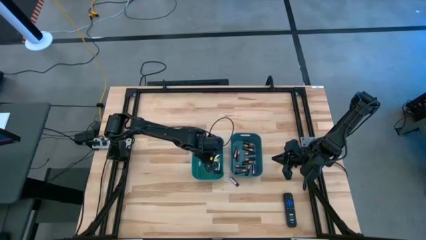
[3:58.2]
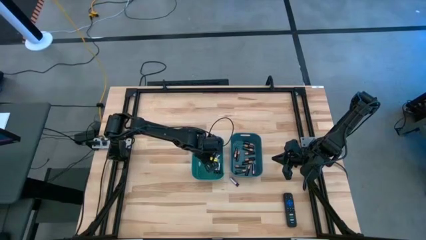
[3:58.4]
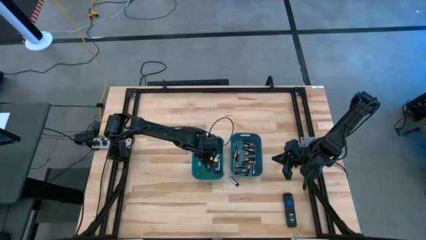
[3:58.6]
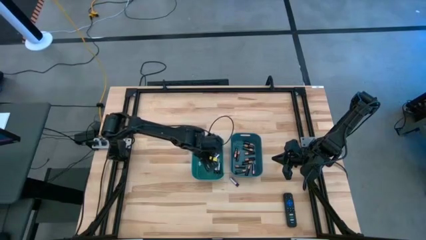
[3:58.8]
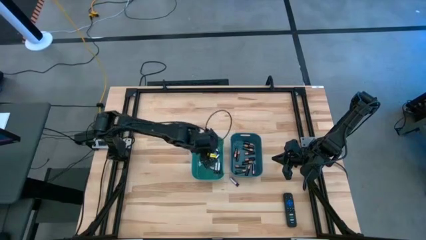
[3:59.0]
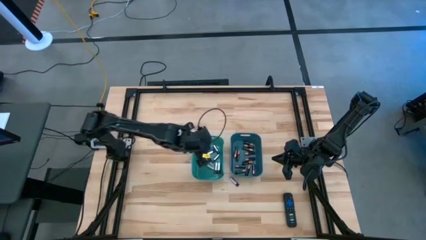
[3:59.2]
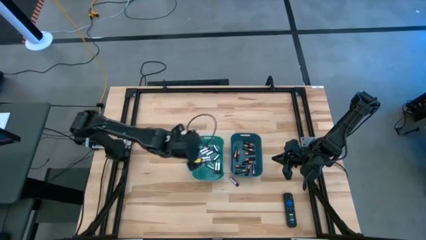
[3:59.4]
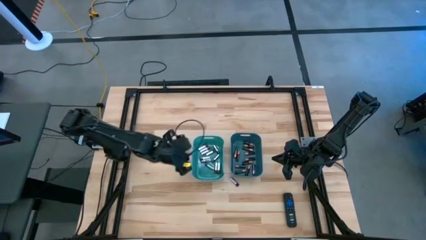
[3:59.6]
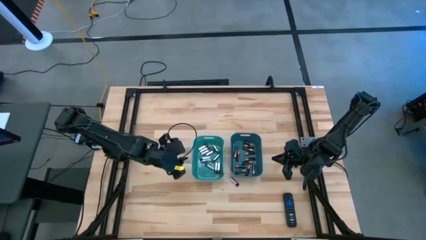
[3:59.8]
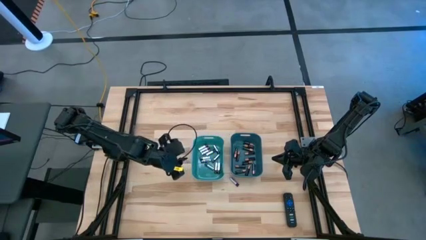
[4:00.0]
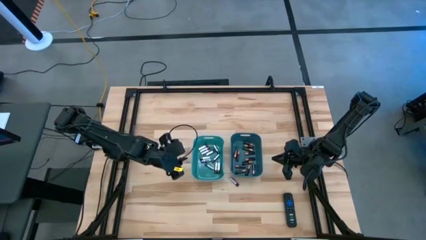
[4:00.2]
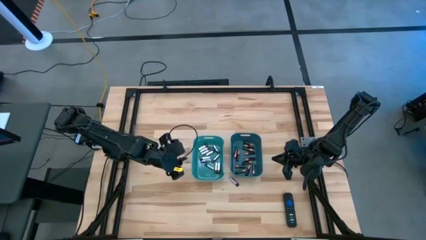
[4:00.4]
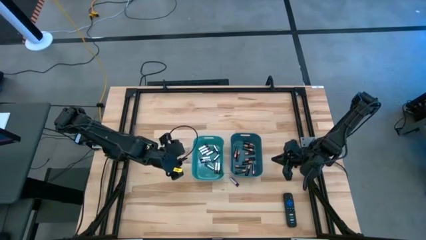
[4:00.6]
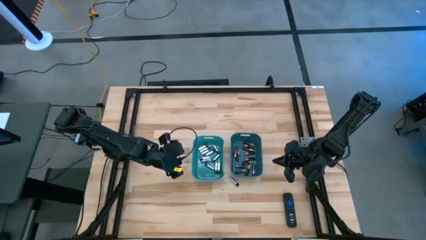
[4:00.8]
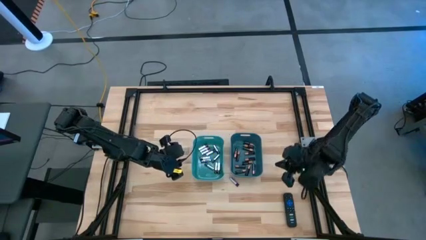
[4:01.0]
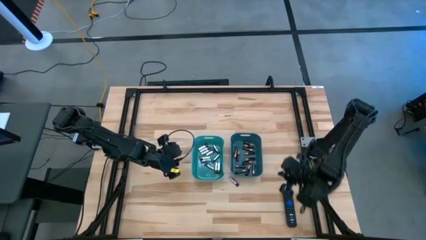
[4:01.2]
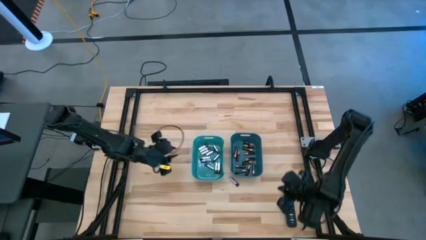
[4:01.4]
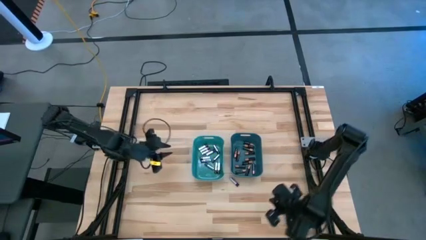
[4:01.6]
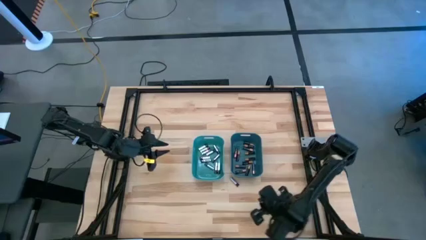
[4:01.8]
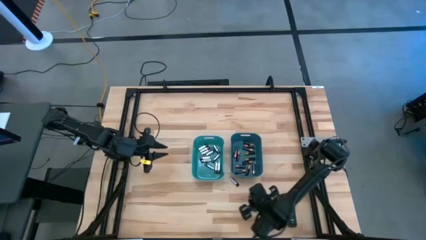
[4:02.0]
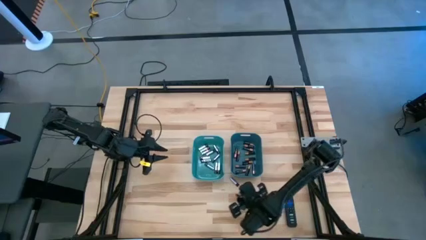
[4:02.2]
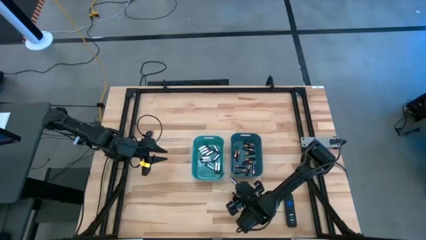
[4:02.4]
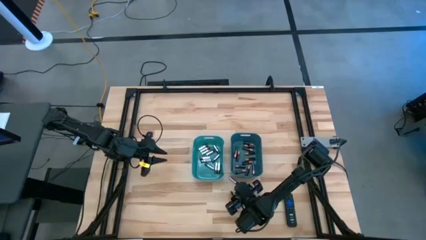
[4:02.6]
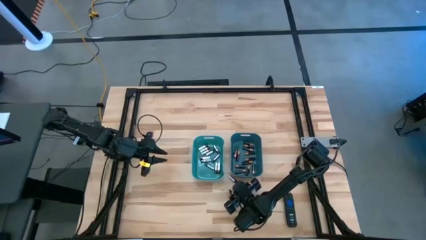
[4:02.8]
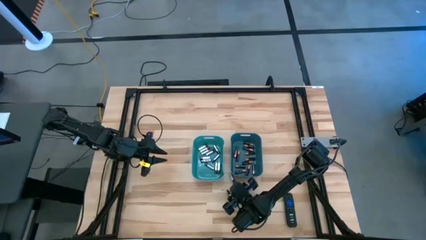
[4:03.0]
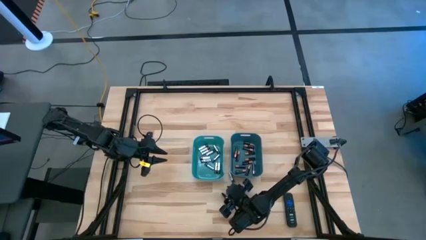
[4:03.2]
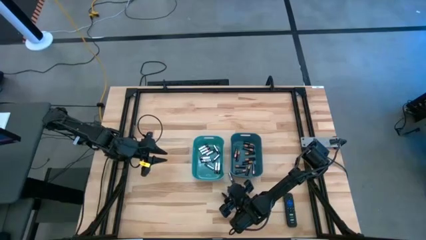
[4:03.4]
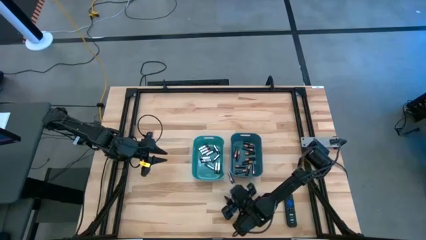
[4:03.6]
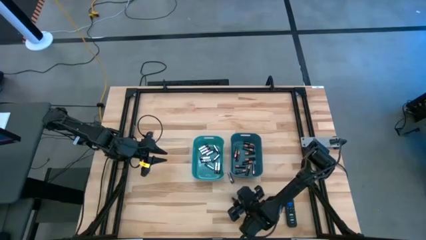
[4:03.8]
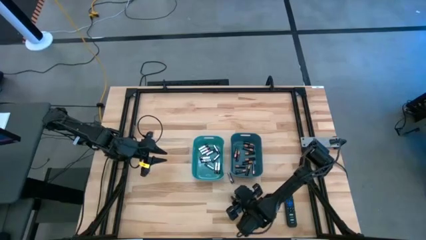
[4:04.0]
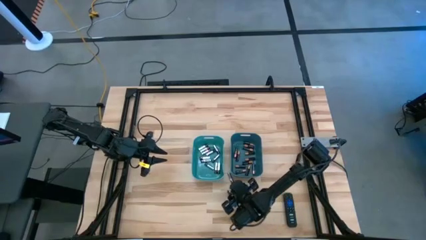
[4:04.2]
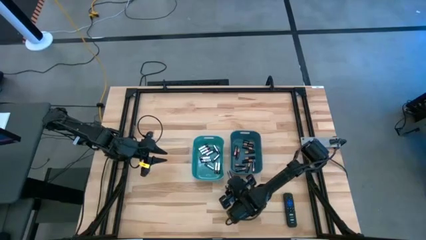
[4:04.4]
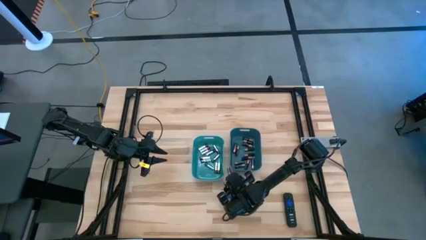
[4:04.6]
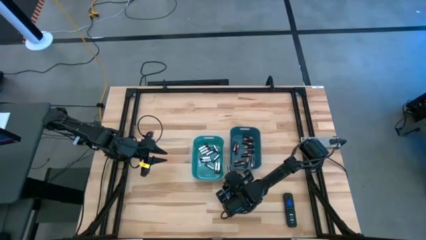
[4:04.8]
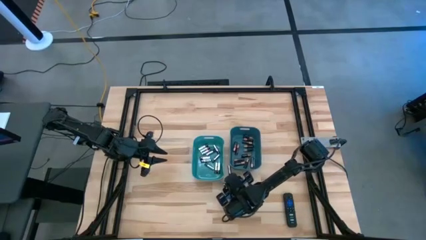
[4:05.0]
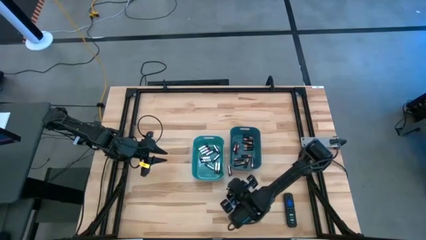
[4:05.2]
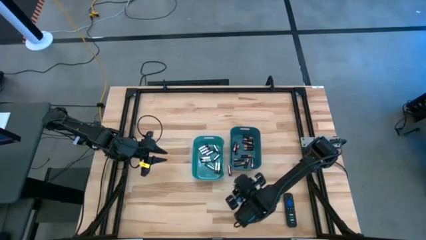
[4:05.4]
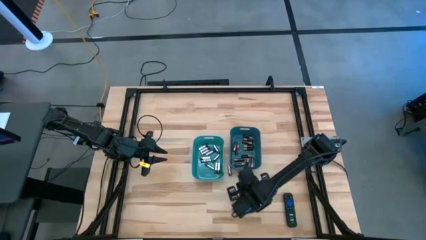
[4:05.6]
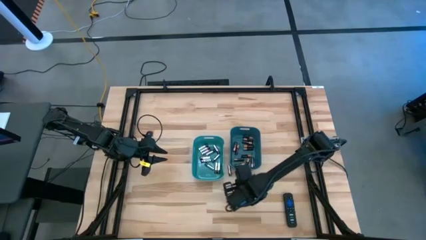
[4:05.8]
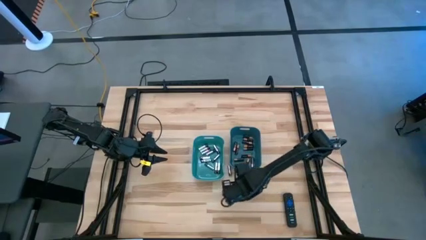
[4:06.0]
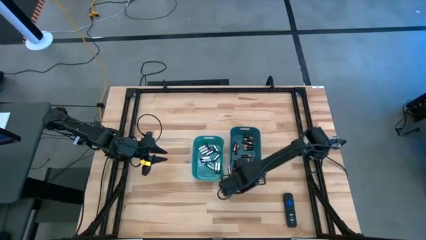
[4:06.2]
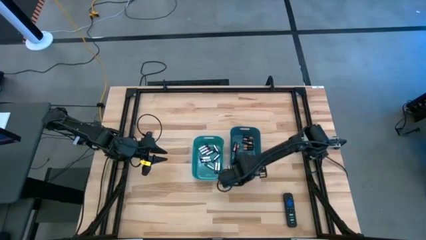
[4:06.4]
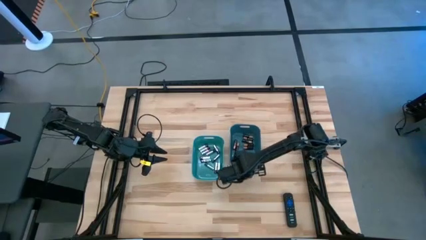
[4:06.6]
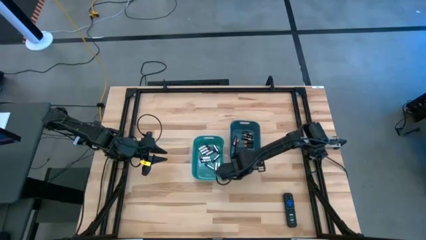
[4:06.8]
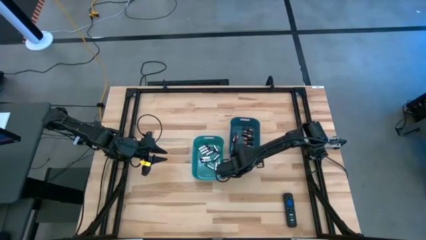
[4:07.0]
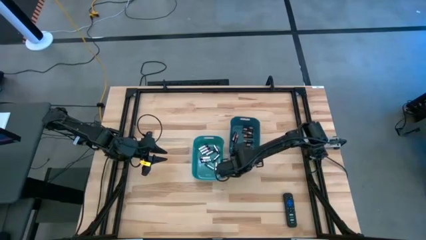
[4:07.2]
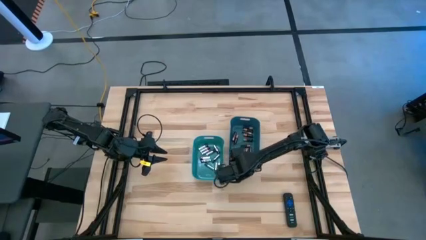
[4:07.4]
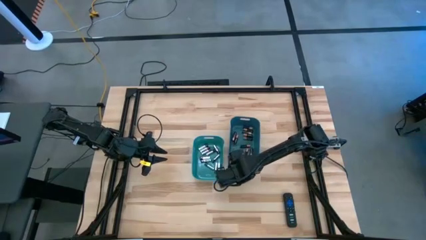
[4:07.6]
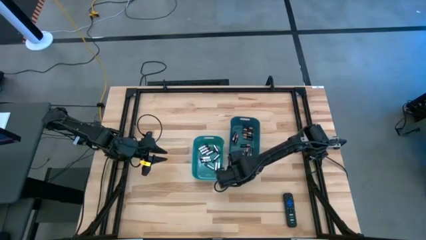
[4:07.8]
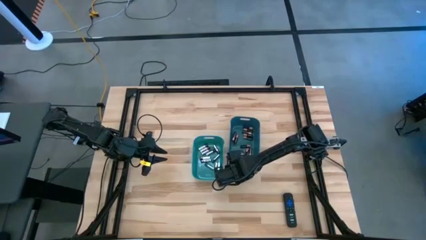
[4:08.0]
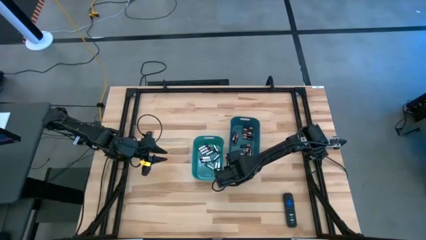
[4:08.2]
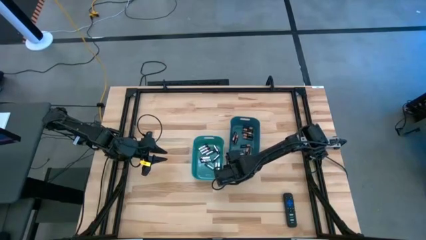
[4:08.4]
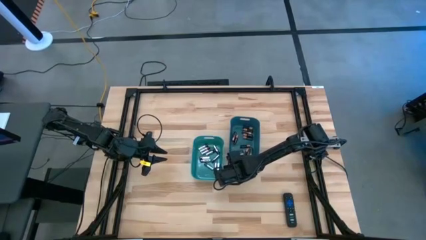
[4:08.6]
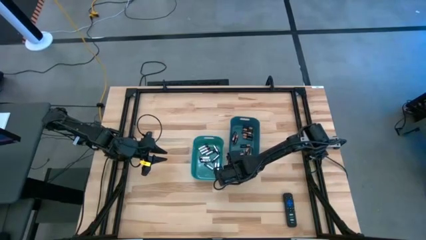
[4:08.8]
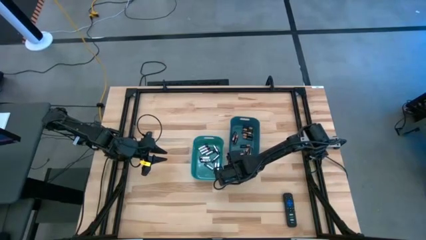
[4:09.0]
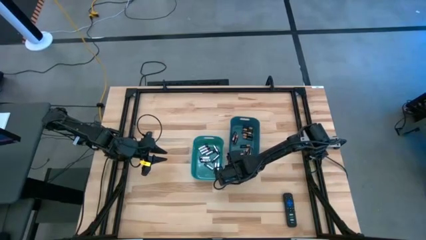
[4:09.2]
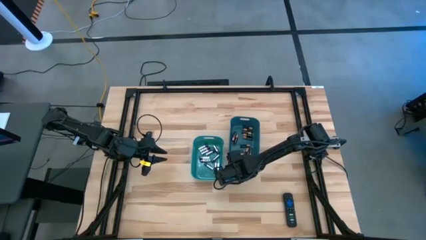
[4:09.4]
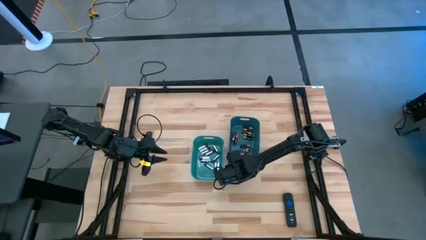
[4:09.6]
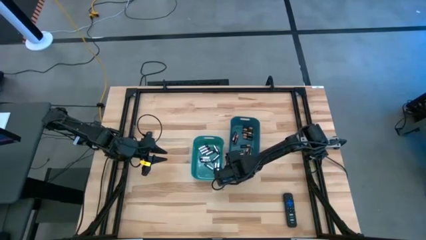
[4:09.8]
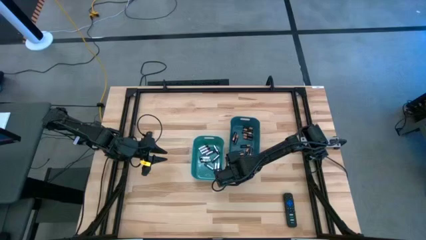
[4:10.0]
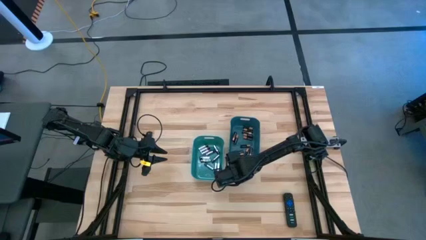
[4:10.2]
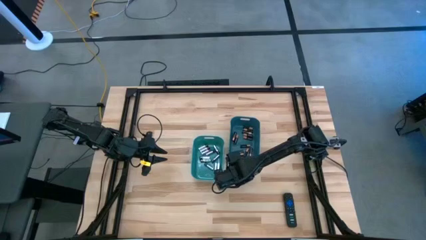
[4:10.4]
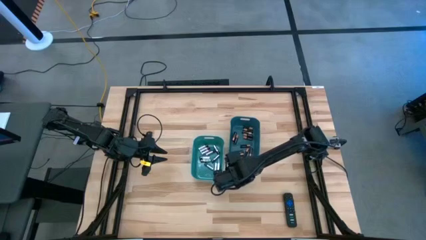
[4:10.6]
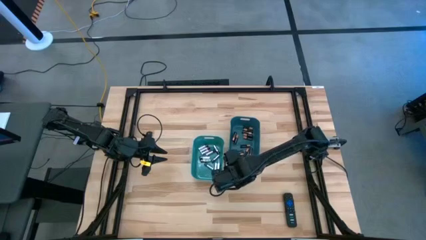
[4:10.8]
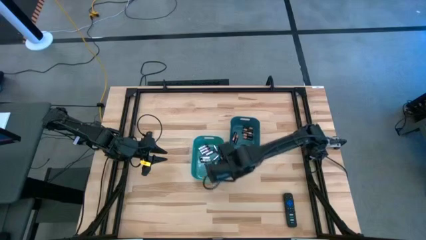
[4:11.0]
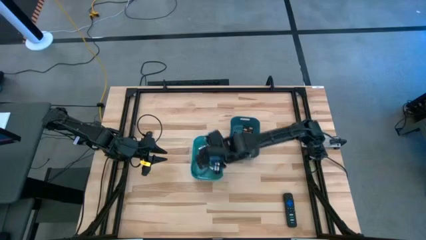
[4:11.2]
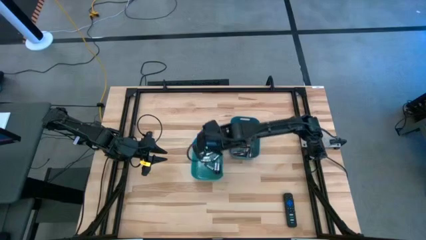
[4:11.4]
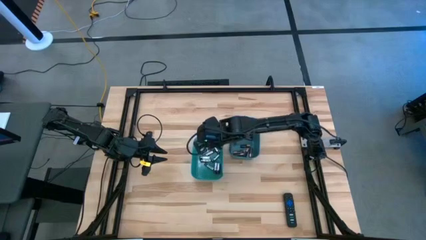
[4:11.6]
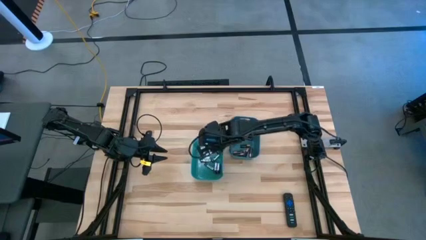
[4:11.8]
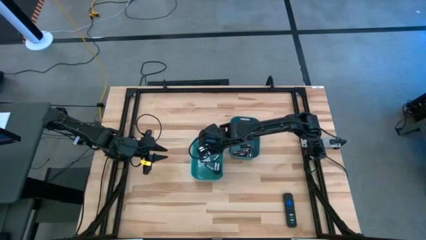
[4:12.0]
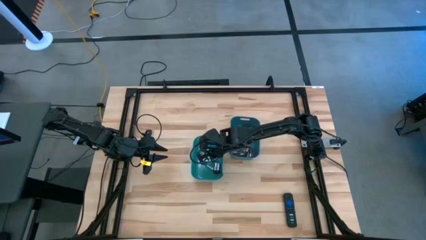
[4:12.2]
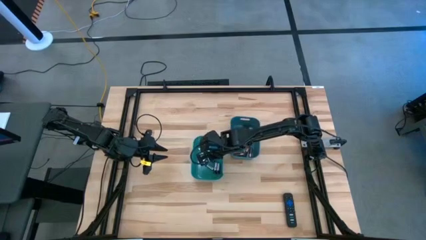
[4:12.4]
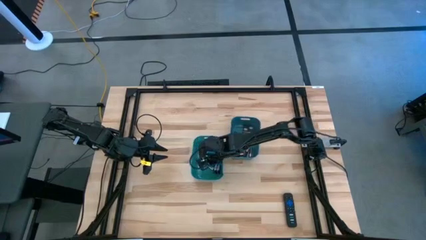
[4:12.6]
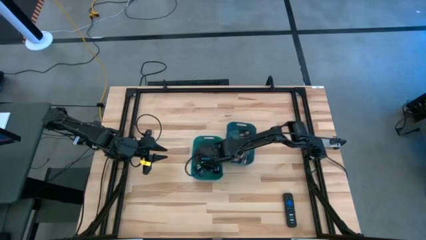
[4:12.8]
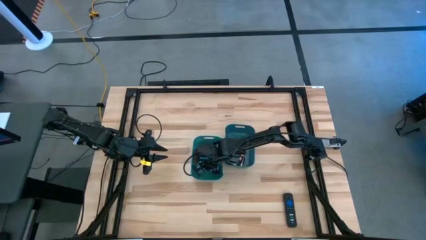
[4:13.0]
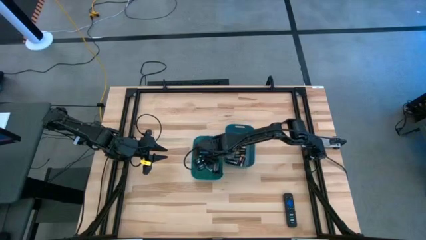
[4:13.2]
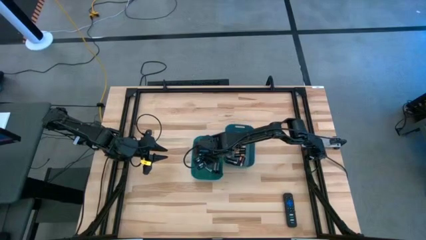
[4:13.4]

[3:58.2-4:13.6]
Task: Sort batteries
Put the silver battery into the green bin
